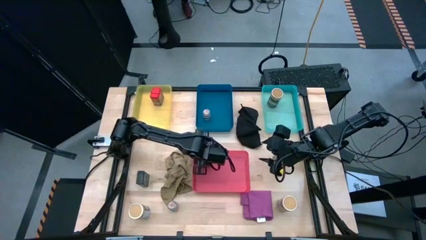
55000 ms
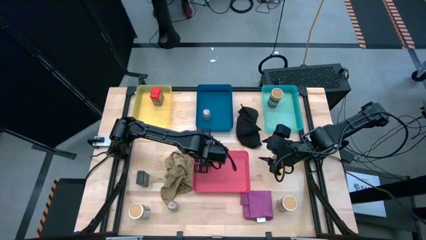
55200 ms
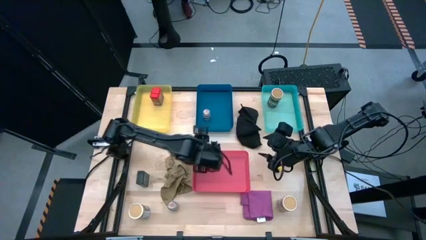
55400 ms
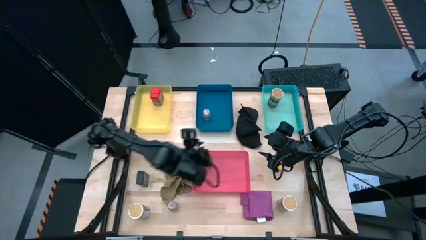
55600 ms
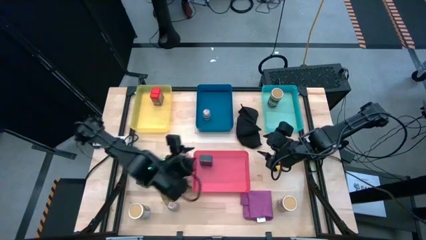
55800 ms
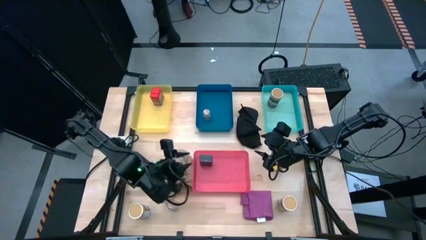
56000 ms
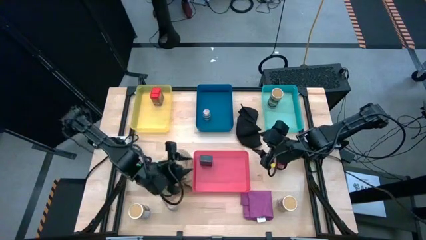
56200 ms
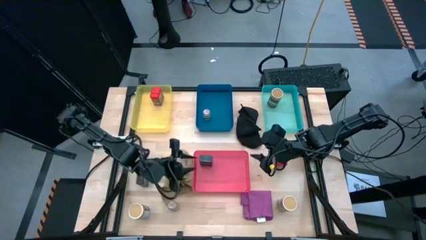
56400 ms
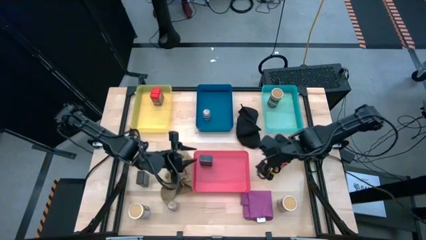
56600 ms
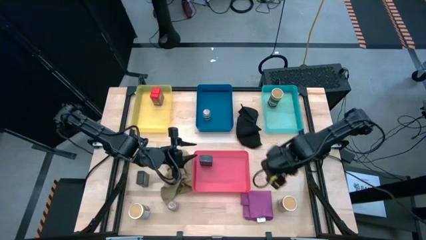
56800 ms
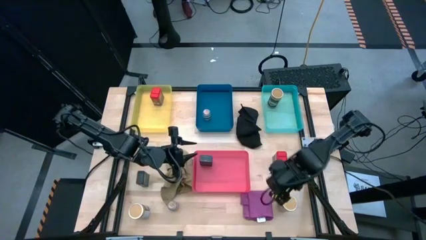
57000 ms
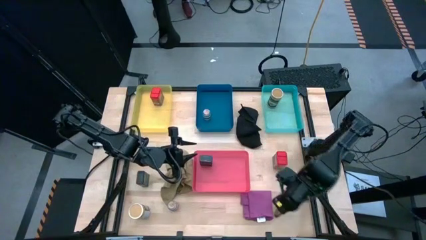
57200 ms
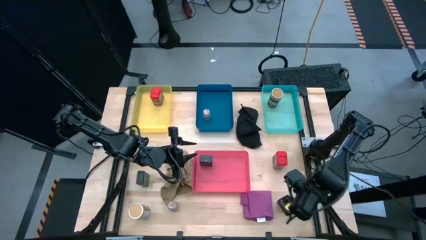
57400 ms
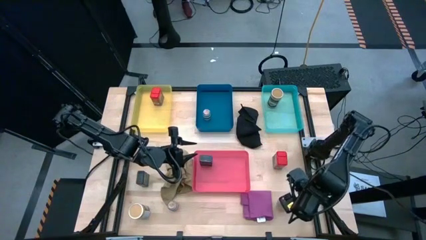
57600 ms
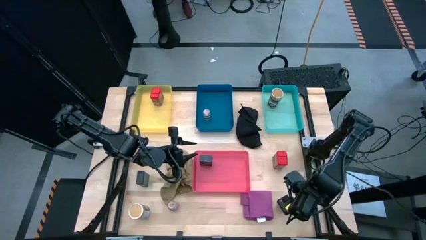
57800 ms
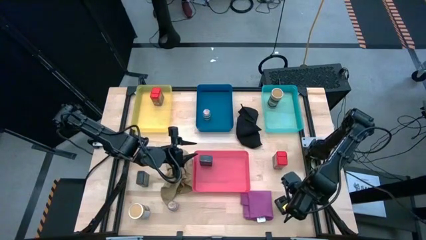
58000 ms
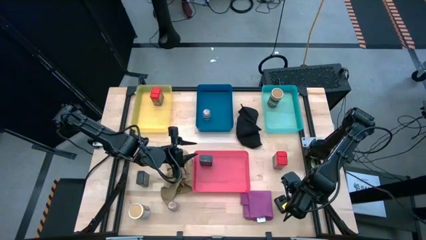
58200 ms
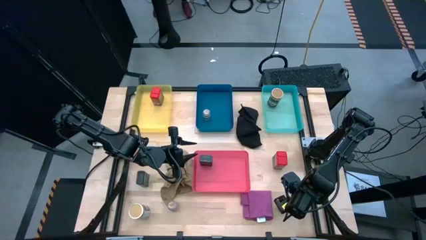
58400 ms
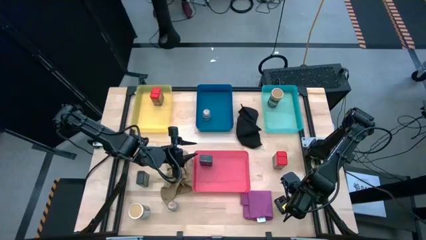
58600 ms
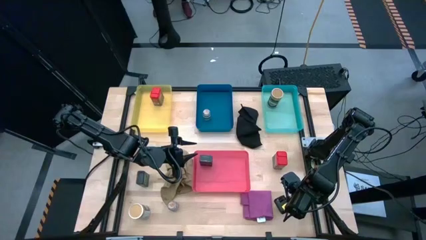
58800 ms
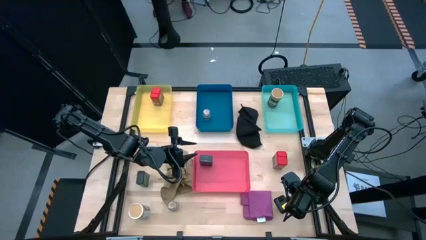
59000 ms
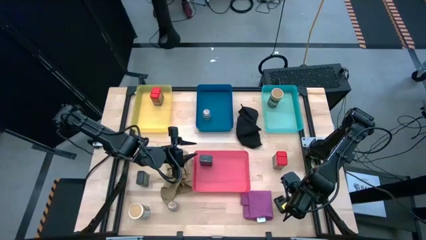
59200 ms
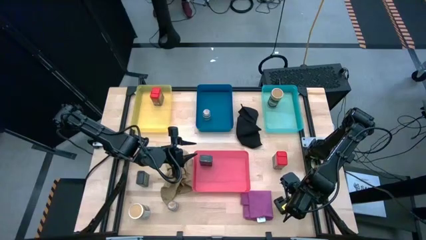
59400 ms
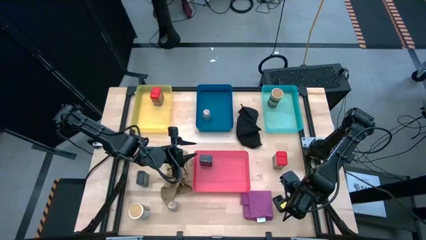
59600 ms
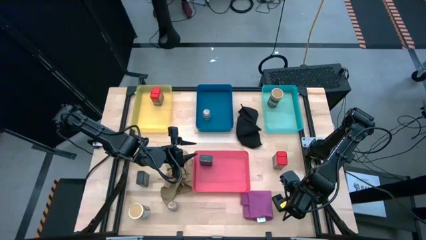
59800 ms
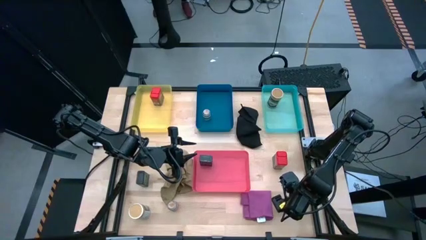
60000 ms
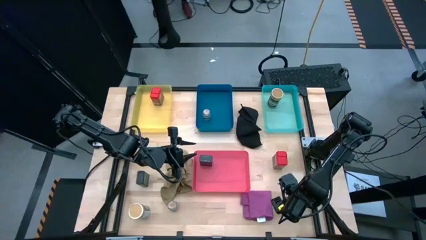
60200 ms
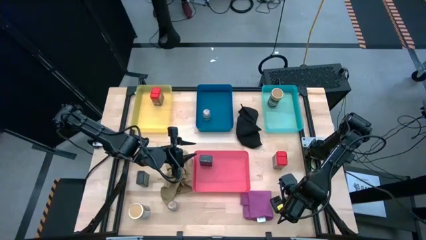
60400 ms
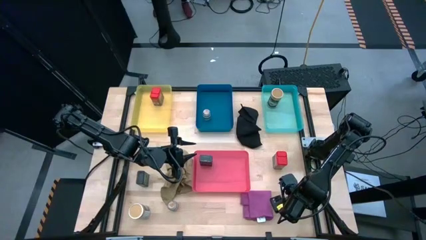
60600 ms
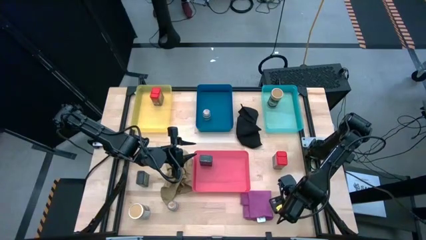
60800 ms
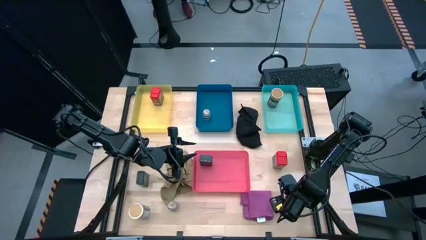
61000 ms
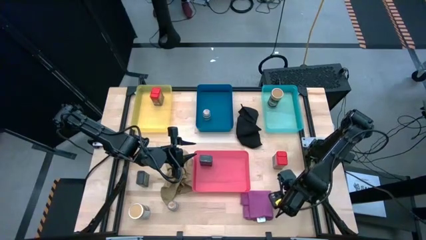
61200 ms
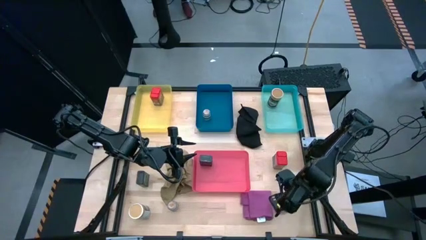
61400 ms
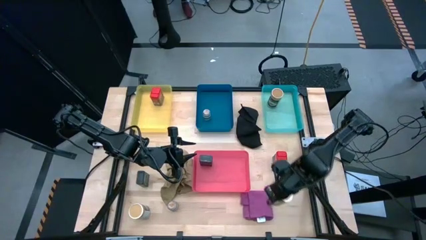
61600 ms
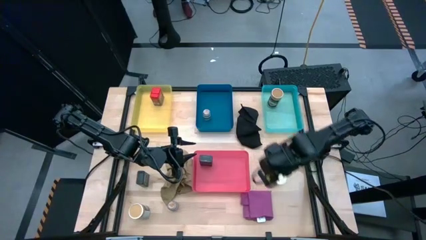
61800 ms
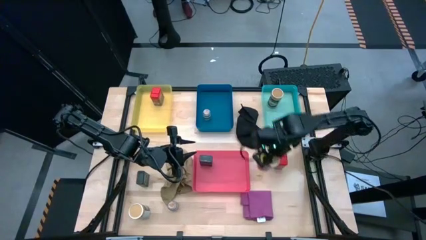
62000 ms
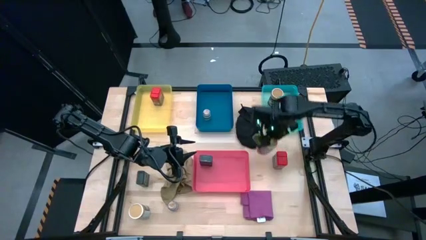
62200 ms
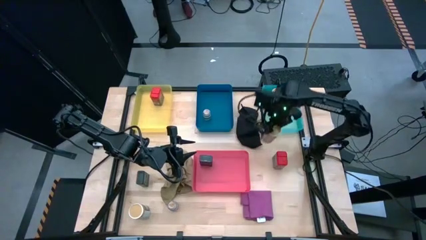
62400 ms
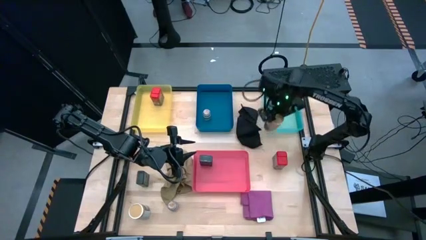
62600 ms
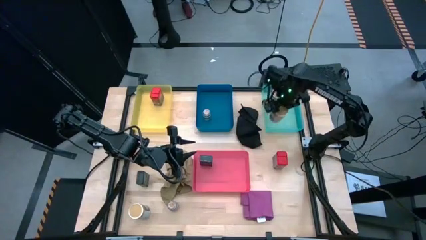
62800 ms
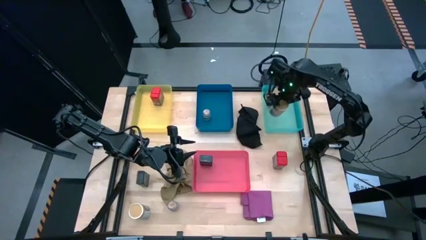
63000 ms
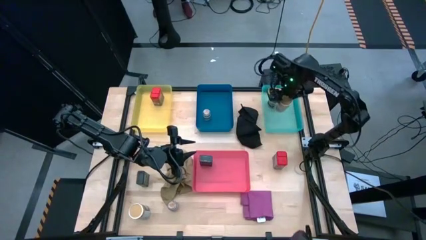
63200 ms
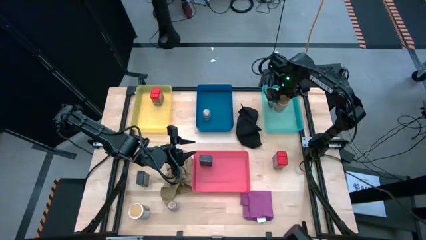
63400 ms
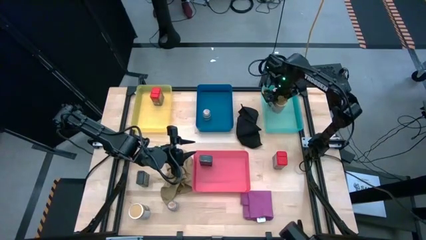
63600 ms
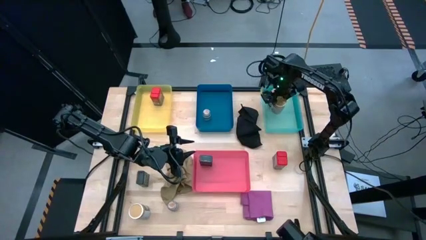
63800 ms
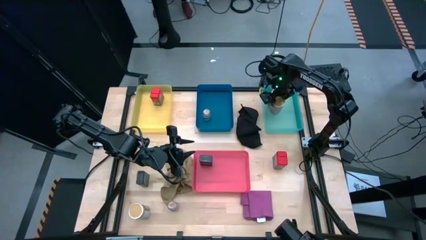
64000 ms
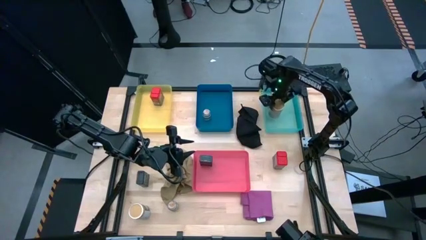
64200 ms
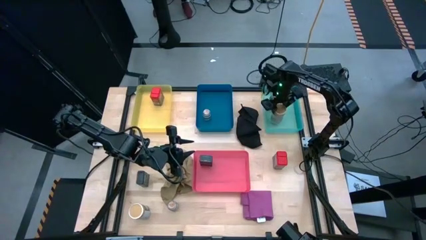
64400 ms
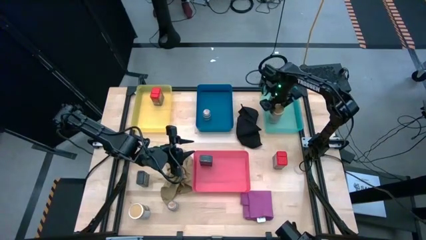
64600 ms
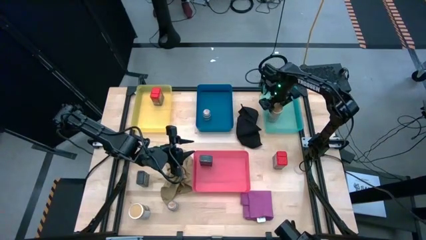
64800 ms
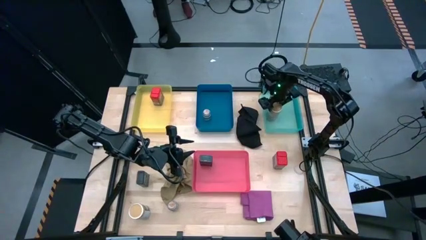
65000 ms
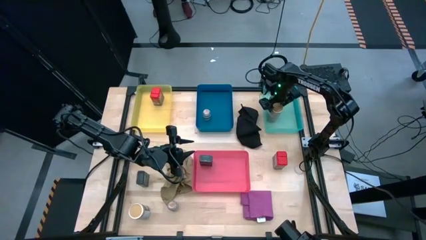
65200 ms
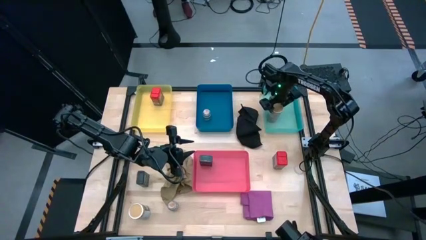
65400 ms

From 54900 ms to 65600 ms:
Task: Sort spices by type
Put the right golden seasoning bottle into the light blue bin

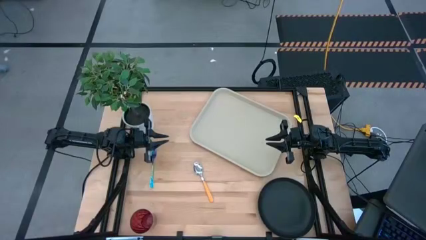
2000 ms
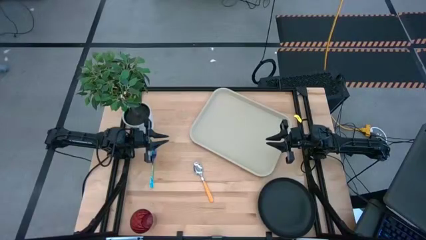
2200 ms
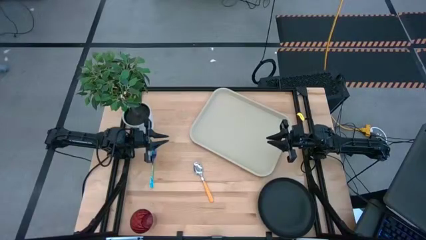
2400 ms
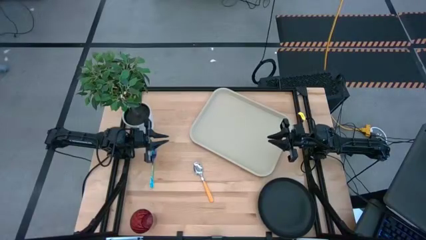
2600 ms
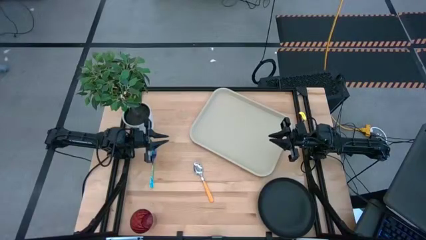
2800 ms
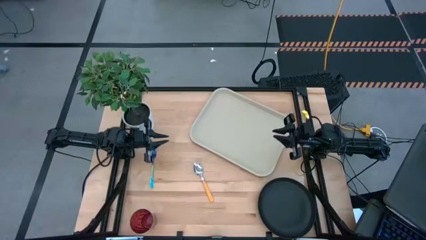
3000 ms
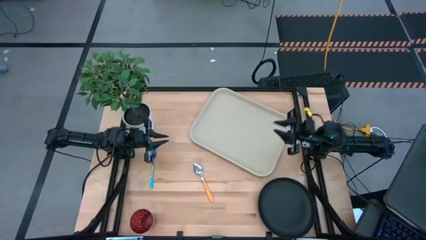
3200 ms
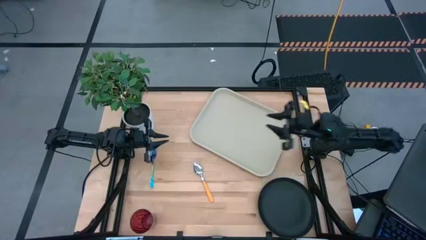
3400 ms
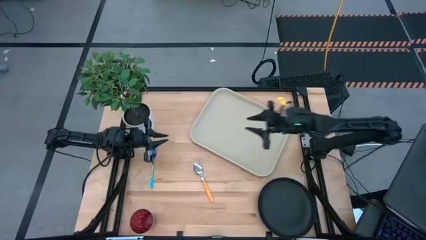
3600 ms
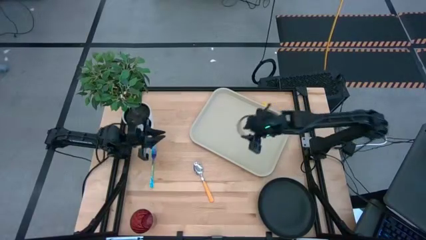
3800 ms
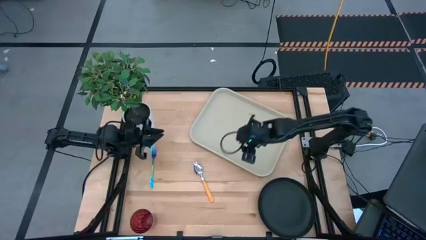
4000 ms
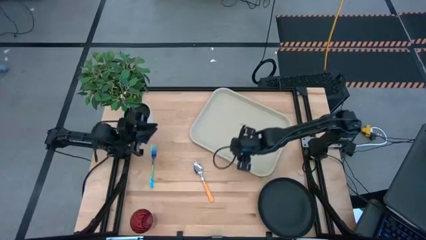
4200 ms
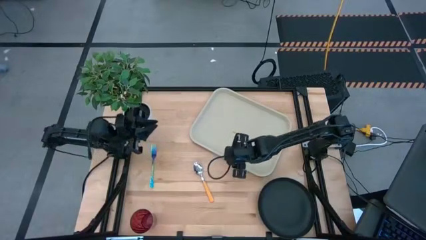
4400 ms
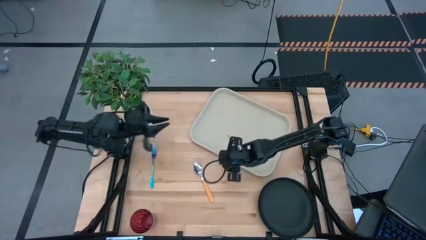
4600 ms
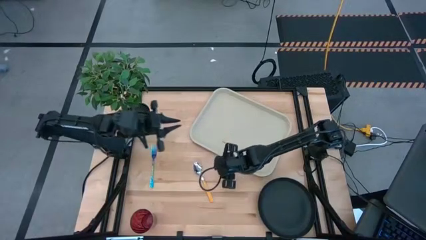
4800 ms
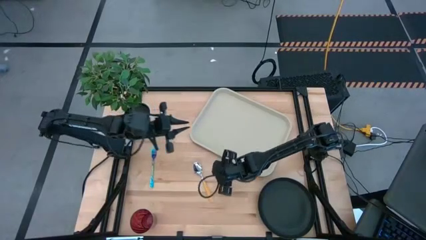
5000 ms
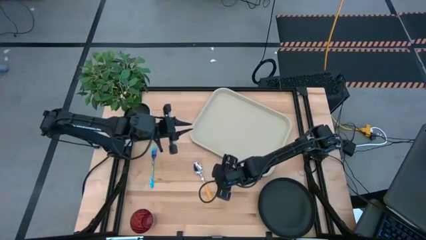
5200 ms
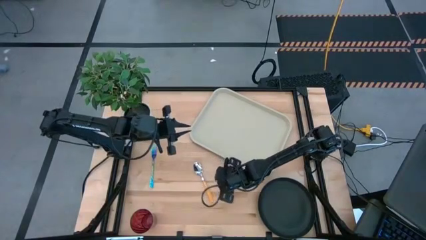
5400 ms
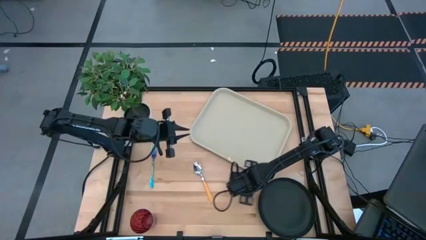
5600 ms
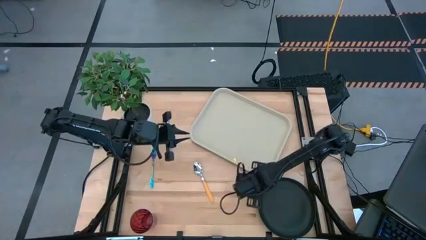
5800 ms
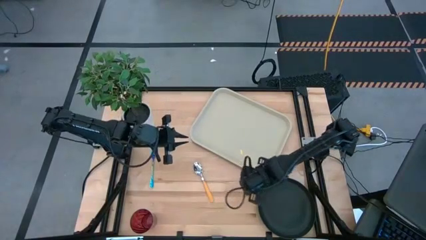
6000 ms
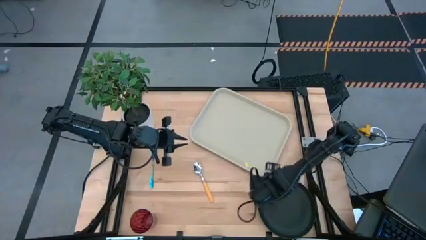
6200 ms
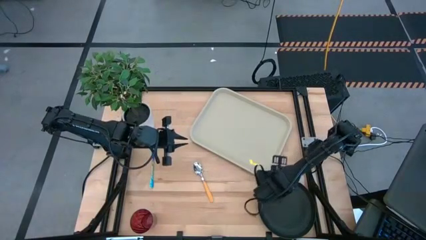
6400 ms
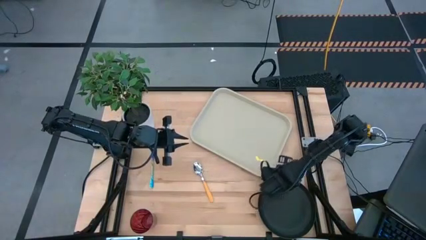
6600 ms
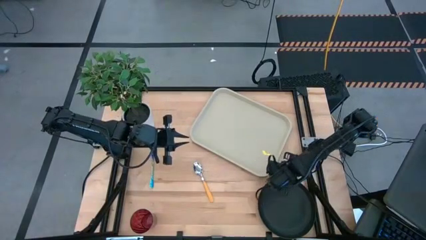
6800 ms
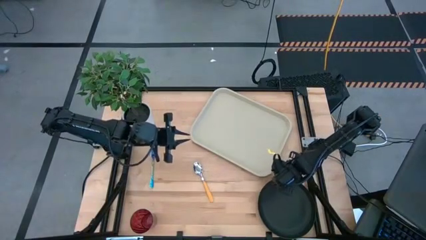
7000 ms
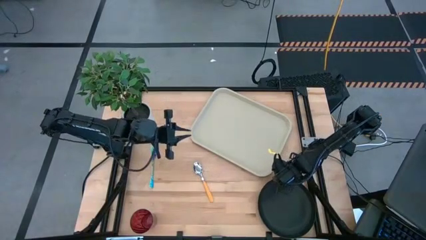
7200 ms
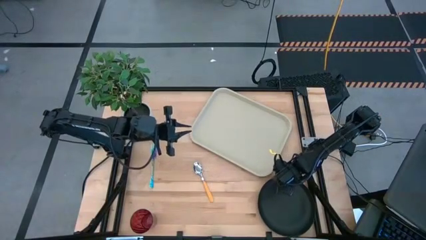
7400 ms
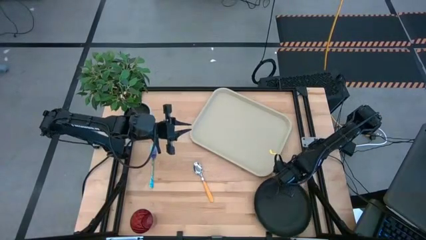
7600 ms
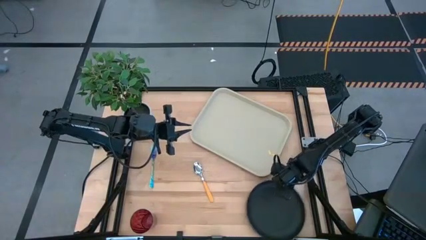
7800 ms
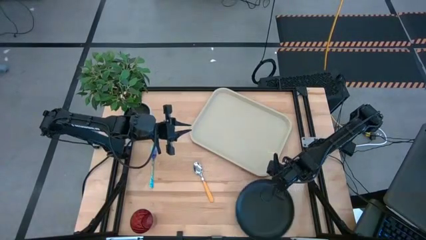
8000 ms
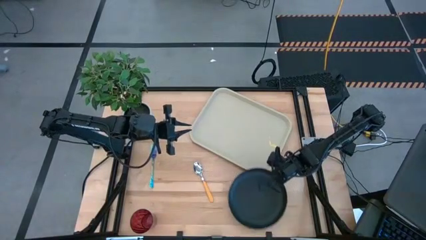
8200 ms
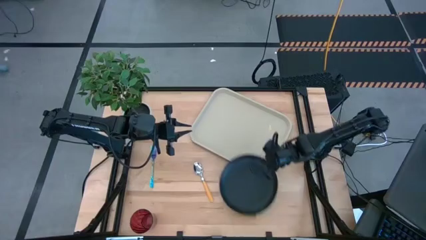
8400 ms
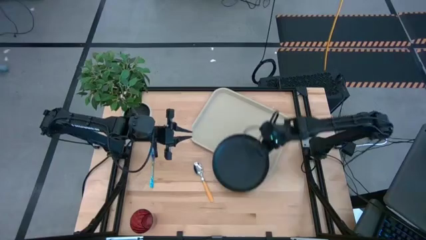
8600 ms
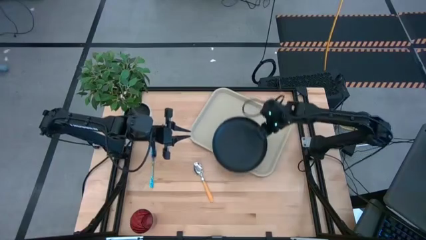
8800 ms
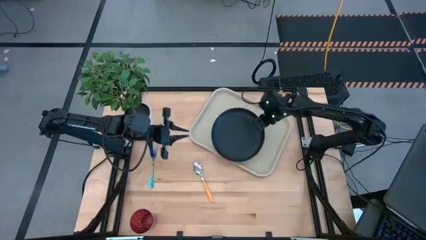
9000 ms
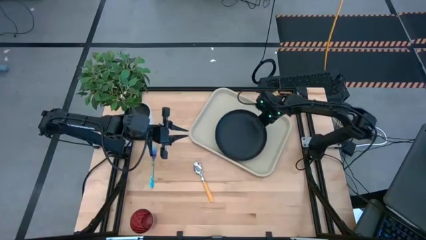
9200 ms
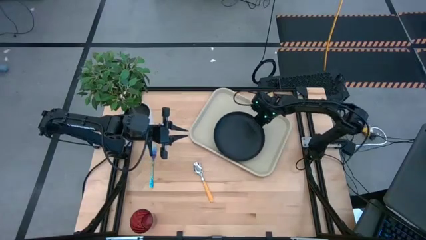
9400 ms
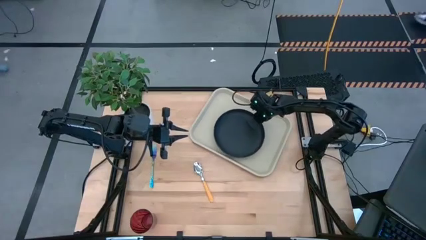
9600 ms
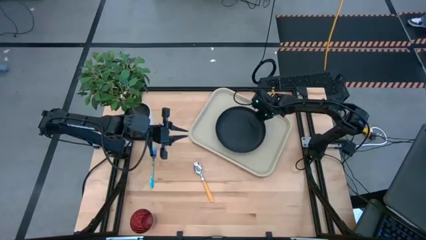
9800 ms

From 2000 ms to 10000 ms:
Task: Pick and place plate/cup/fork/spoon on tray
Put the black plate in the center of the tray
